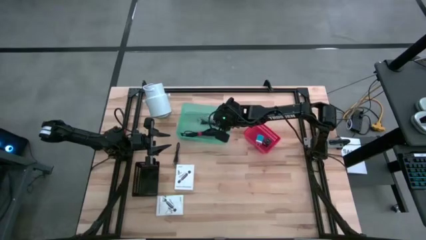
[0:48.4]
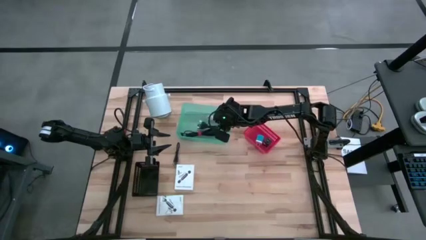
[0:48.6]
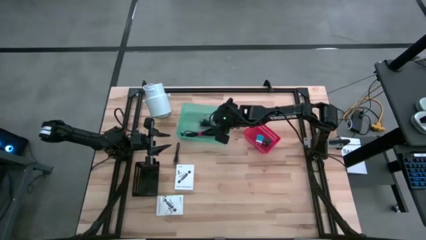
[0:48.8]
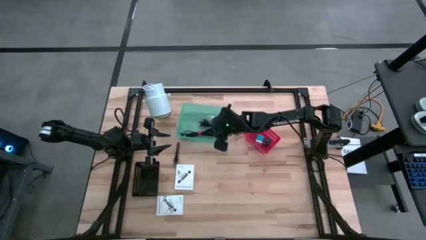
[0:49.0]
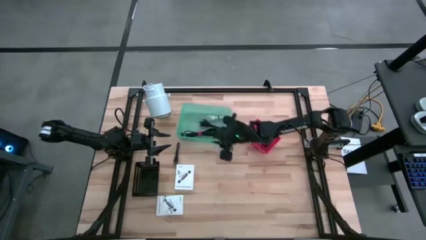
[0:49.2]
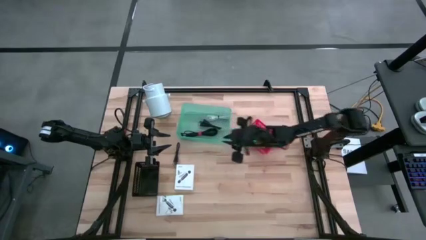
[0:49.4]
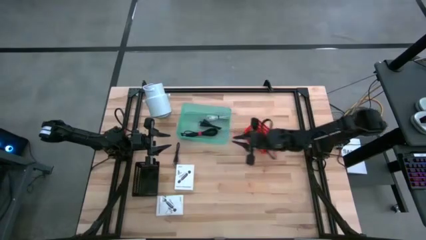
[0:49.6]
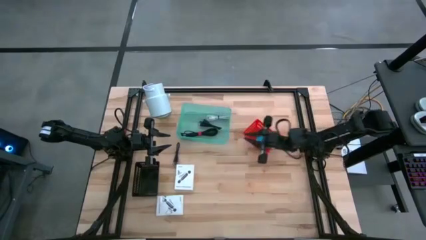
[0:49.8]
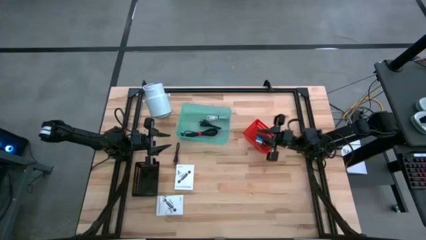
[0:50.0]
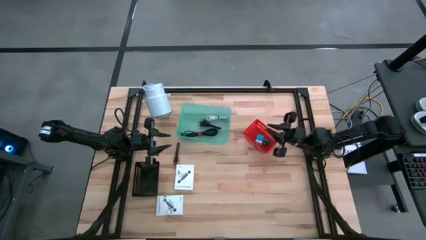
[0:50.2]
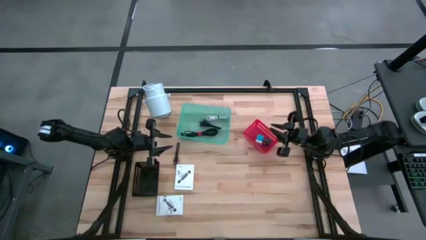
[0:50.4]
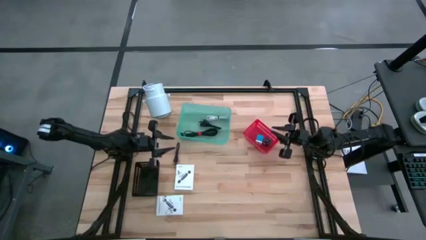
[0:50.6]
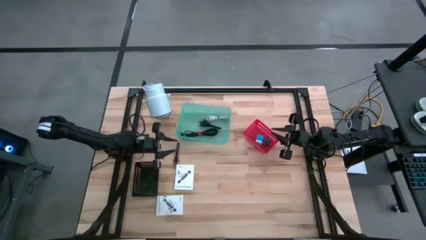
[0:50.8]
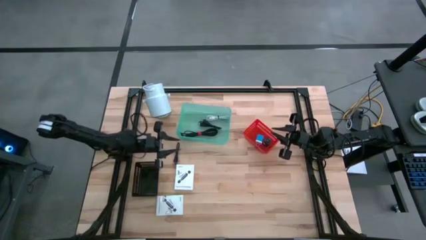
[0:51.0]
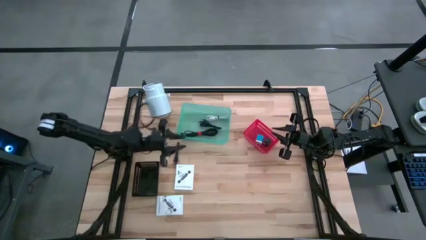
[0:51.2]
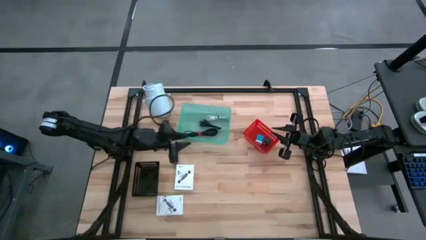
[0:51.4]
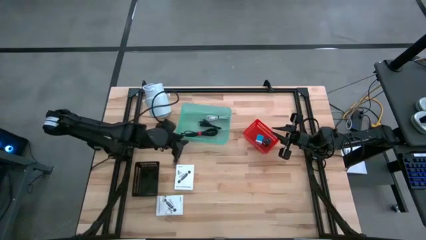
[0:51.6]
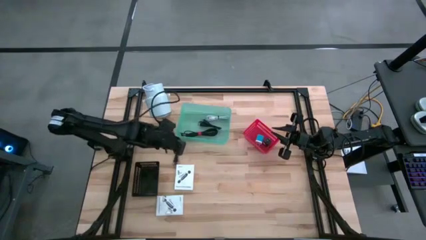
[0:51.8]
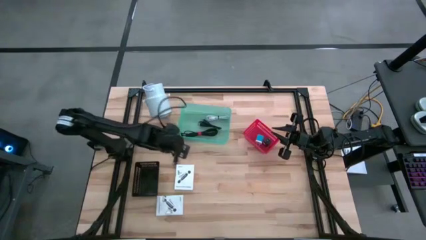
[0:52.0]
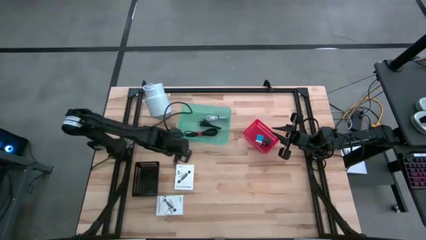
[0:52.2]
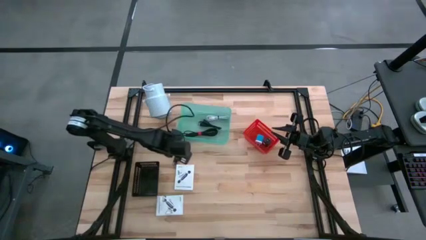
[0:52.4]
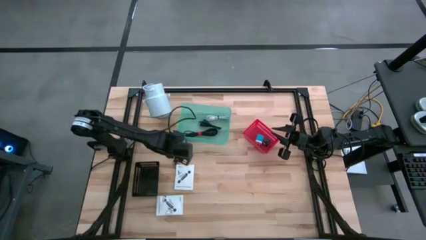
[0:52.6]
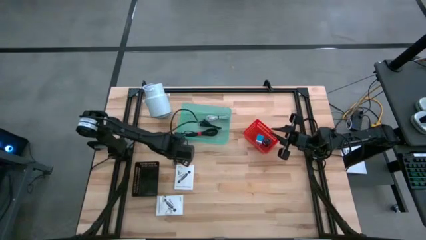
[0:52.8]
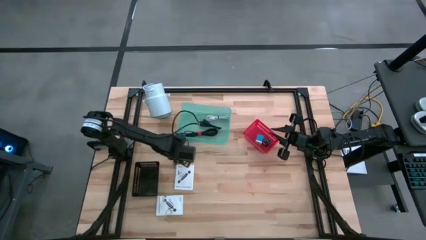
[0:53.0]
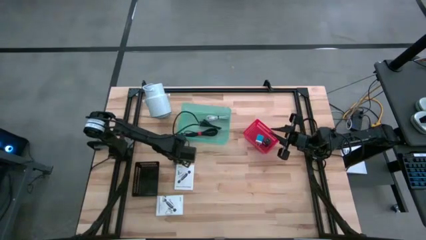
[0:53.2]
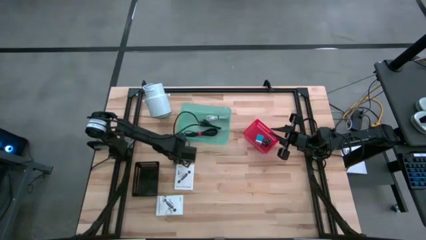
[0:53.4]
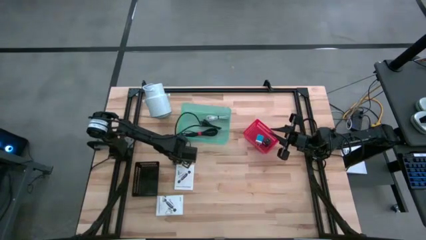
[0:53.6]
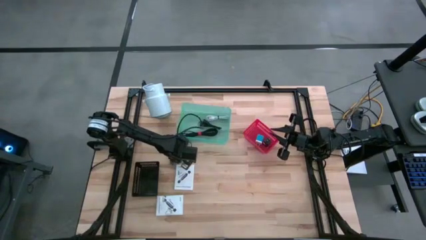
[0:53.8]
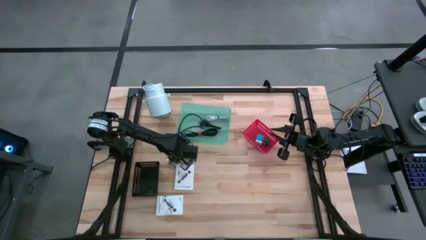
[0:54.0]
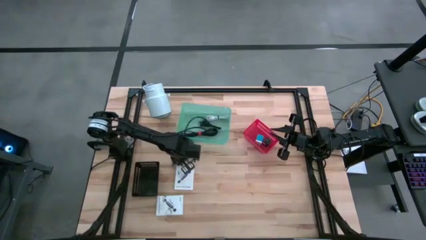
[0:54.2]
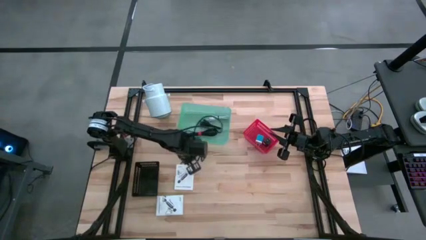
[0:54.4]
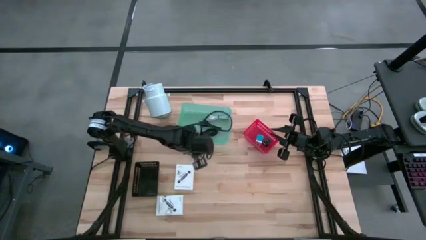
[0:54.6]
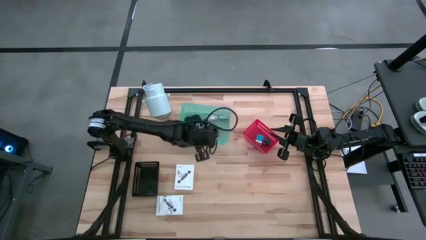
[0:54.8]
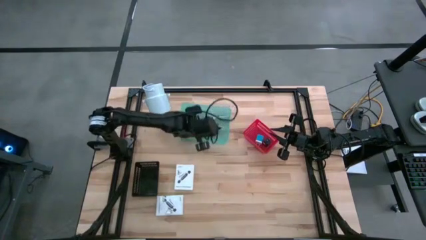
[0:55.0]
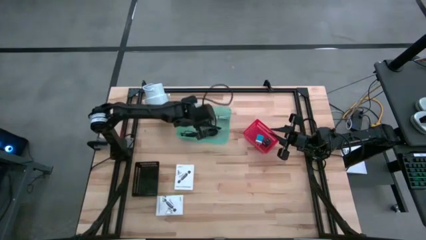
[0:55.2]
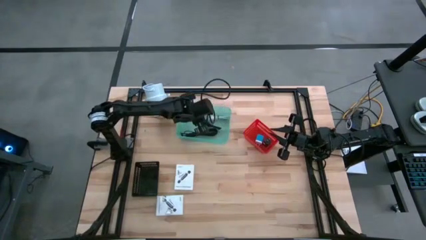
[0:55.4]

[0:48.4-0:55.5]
Task: Pick and place items into bin
Put the black charger cable into the transparent green bin

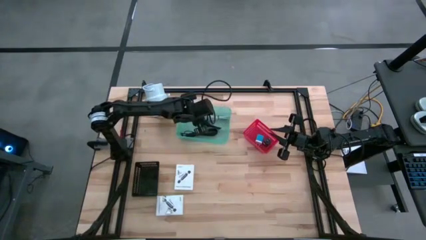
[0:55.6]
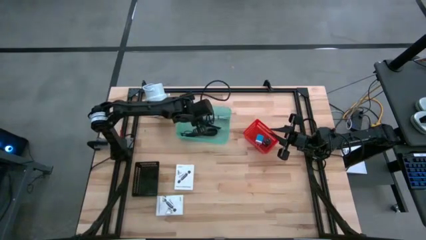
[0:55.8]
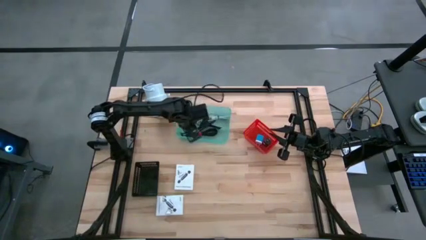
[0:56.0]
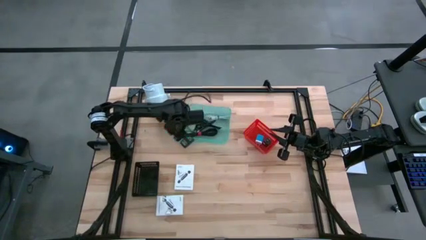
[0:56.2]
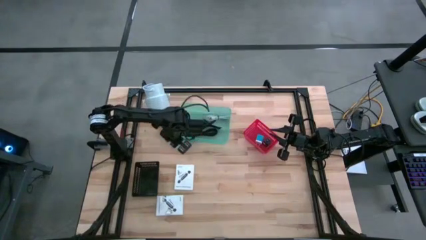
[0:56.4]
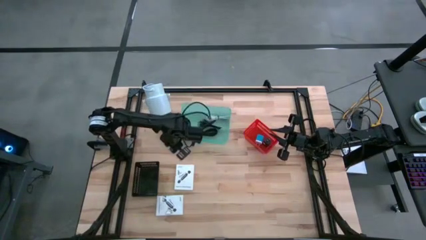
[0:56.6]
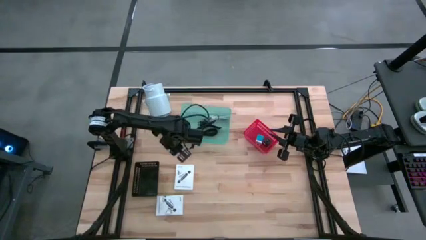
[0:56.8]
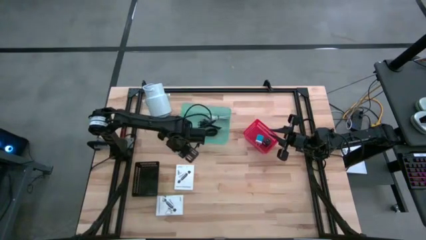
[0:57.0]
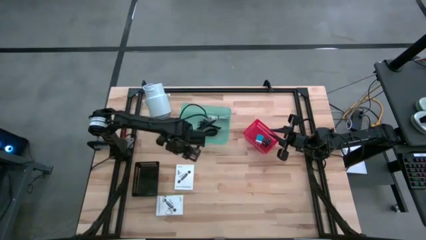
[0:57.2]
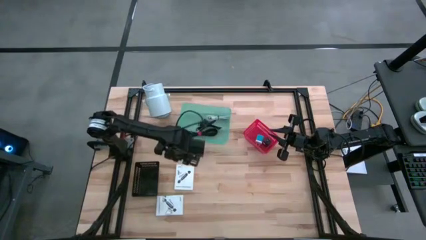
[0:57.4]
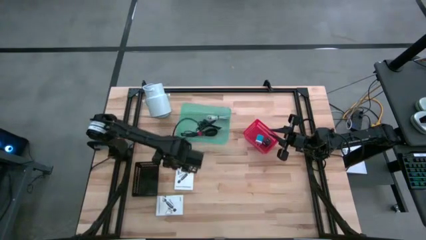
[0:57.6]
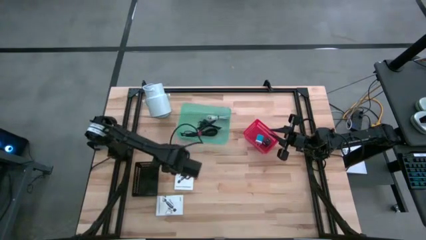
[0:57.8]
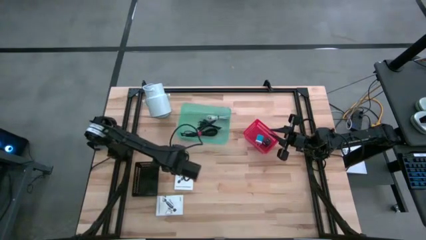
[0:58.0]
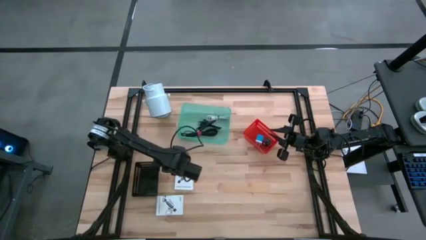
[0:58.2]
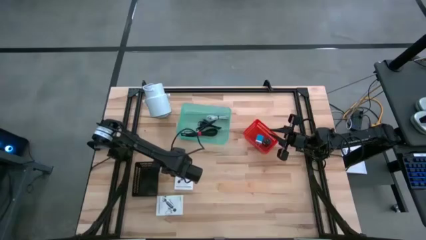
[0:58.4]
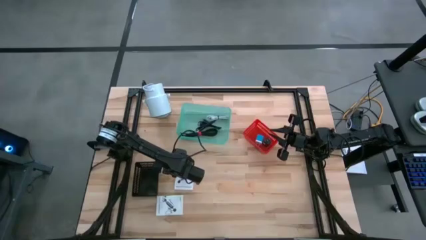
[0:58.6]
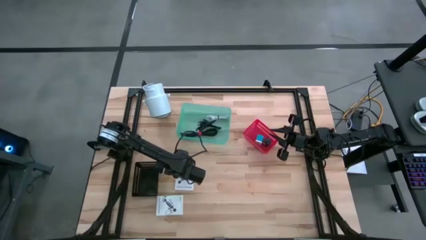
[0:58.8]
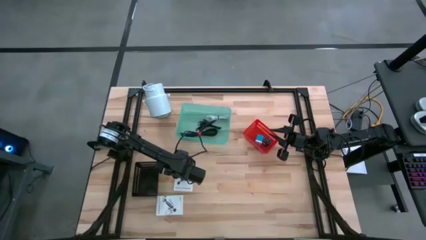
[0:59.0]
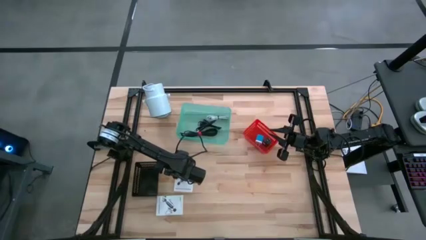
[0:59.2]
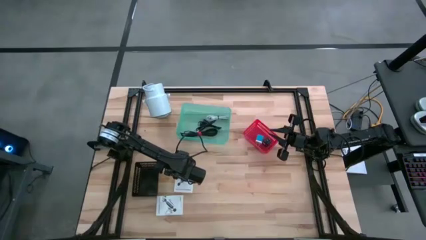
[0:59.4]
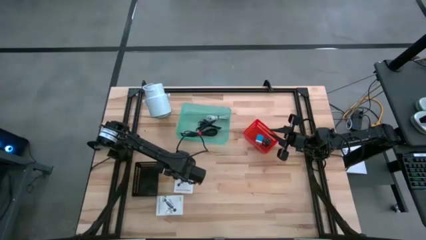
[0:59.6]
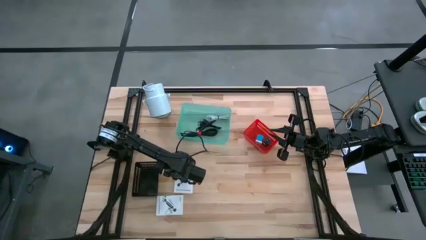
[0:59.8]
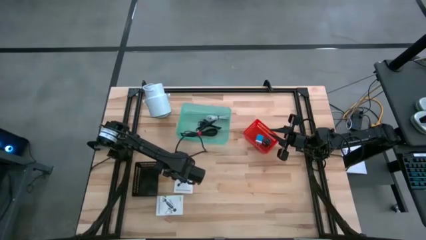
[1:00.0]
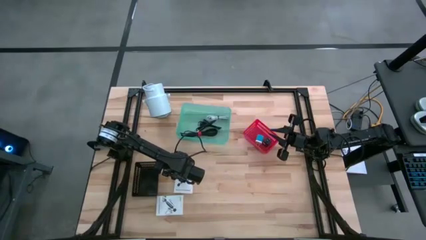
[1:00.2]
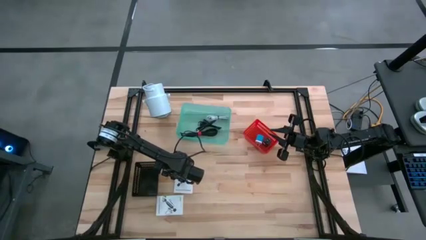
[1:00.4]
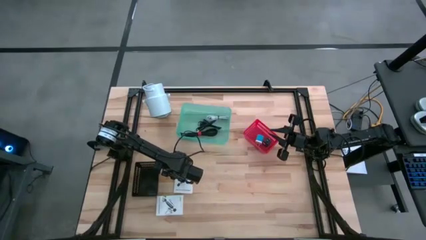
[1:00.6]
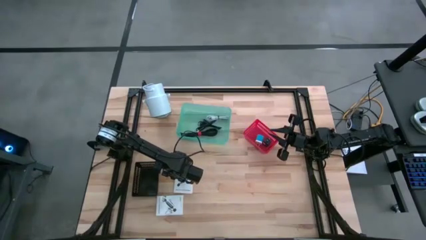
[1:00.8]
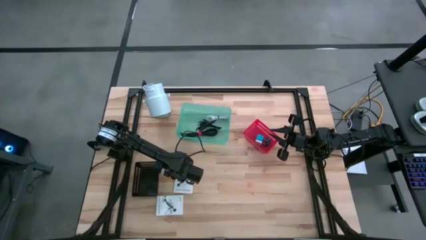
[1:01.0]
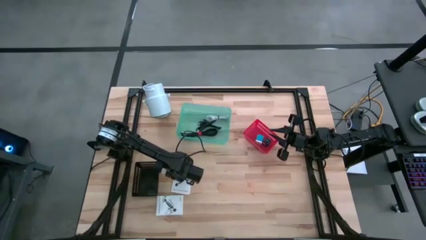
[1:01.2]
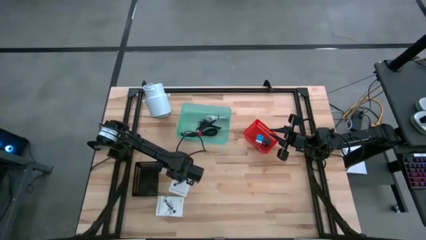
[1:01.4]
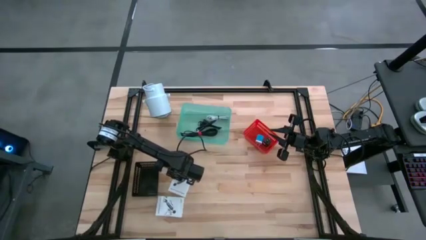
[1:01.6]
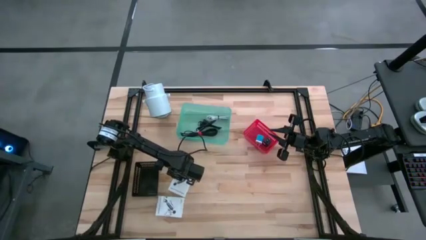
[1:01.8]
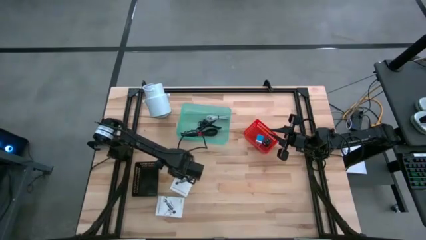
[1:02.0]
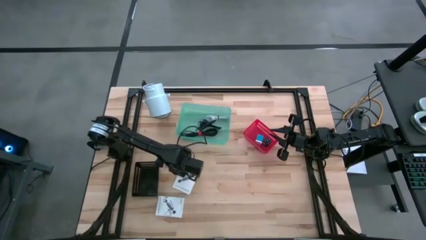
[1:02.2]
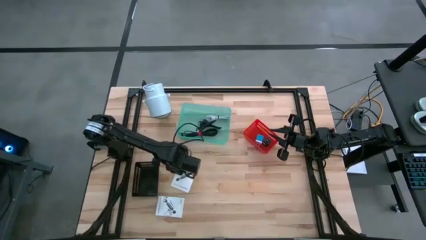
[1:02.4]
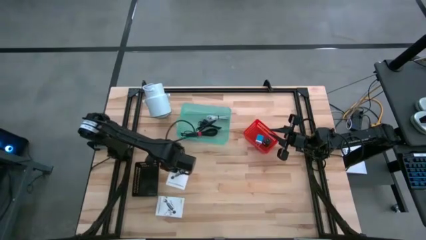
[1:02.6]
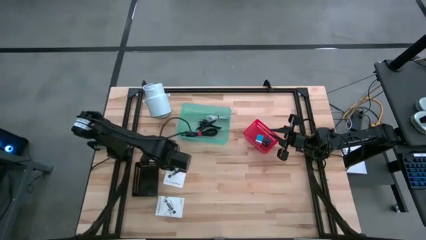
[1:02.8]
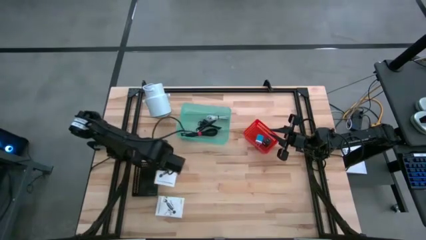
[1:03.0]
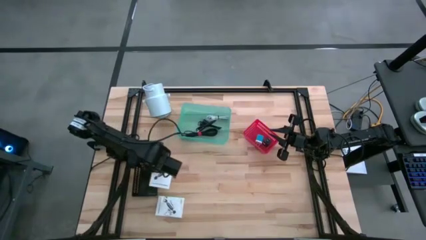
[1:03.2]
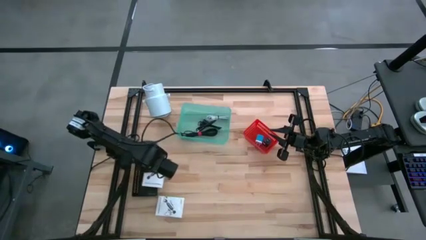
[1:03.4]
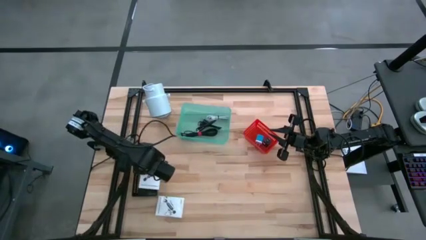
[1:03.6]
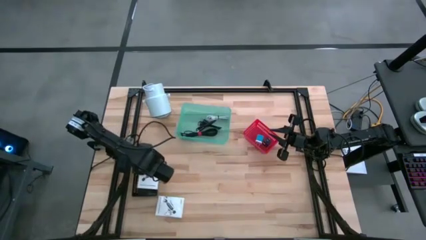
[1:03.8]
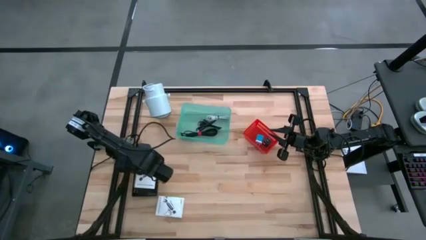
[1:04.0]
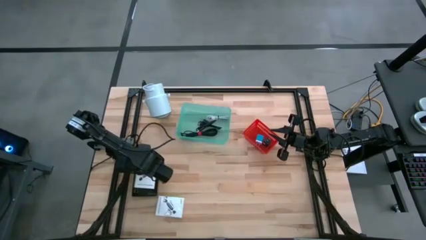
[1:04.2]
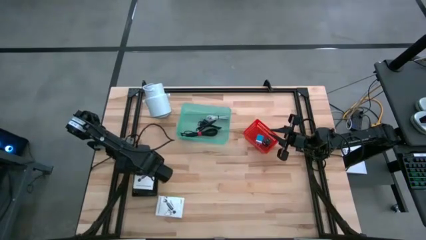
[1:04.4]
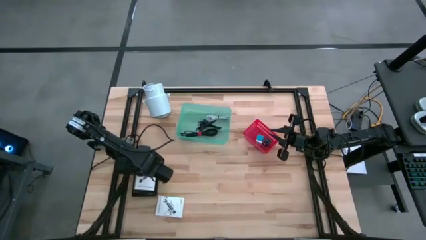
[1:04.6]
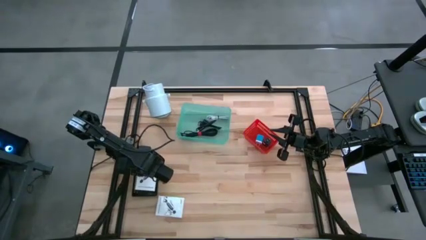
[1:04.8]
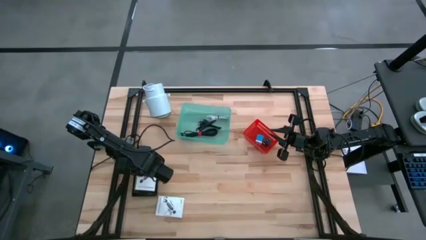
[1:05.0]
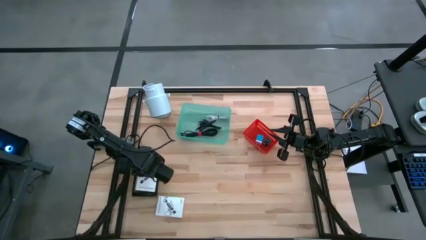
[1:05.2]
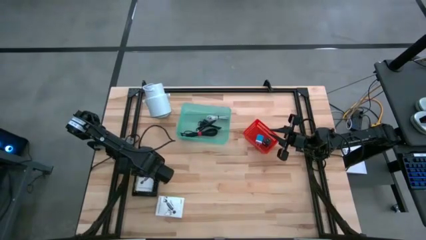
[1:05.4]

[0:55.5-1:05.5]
Put the top card reader box into the black bin
